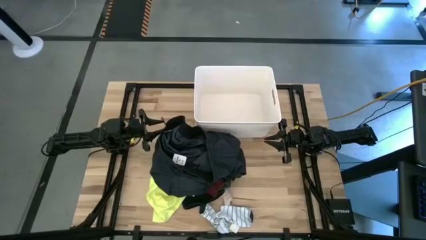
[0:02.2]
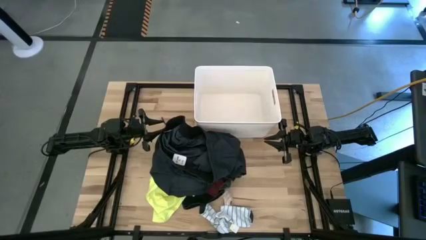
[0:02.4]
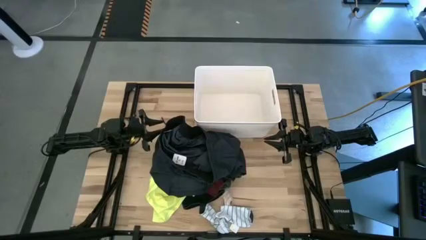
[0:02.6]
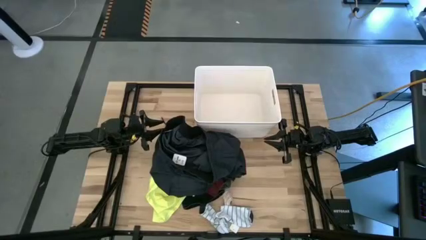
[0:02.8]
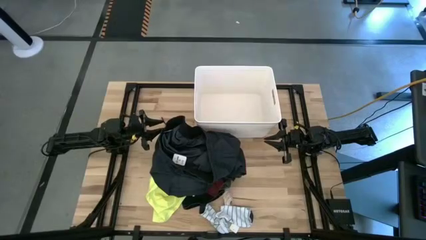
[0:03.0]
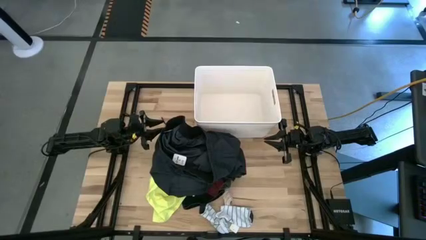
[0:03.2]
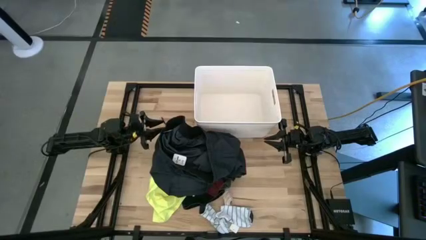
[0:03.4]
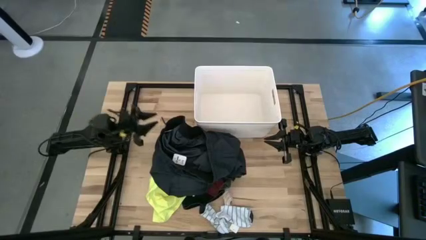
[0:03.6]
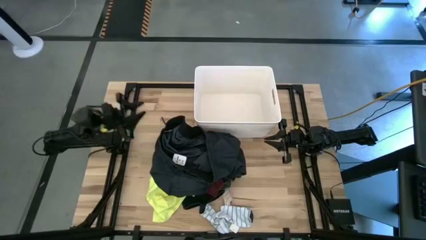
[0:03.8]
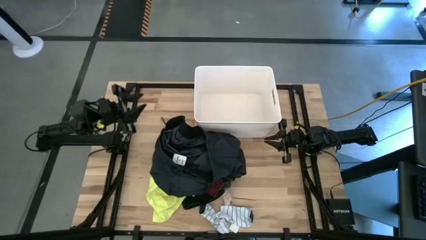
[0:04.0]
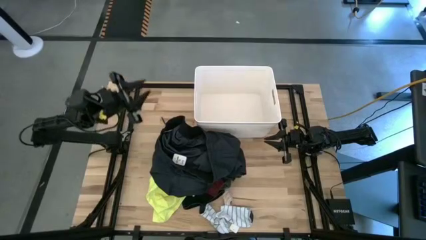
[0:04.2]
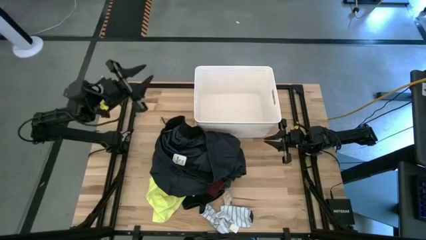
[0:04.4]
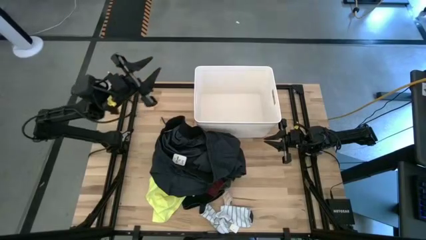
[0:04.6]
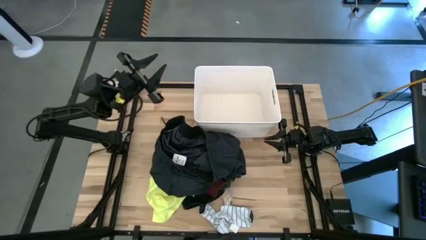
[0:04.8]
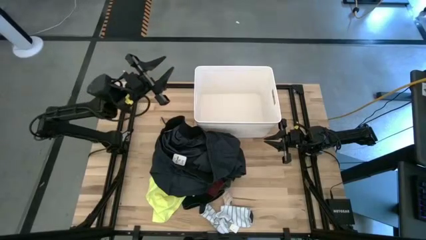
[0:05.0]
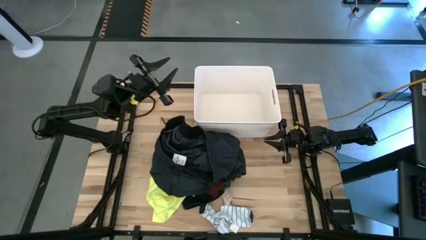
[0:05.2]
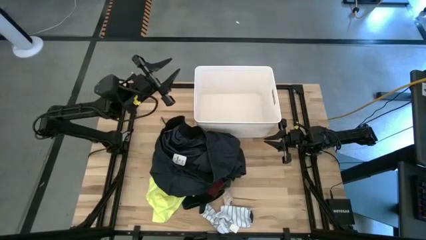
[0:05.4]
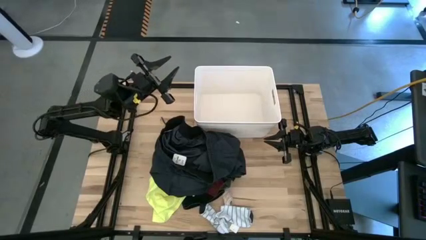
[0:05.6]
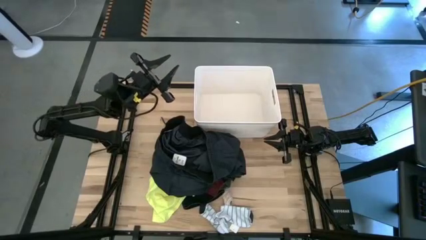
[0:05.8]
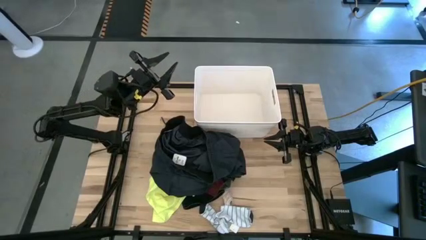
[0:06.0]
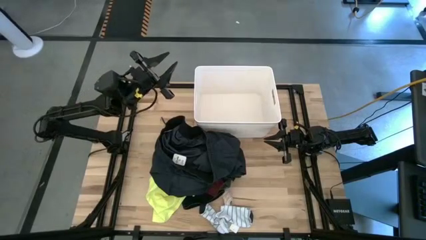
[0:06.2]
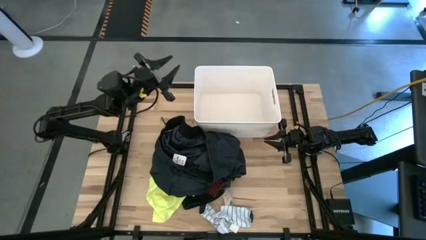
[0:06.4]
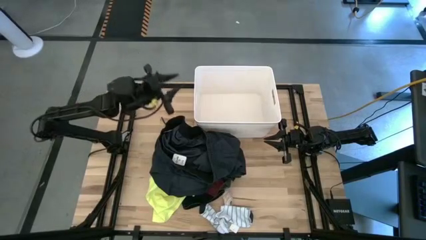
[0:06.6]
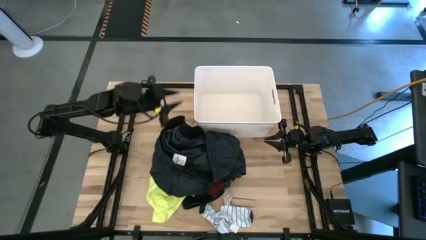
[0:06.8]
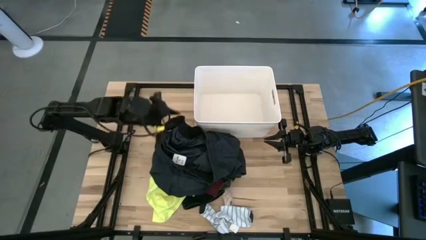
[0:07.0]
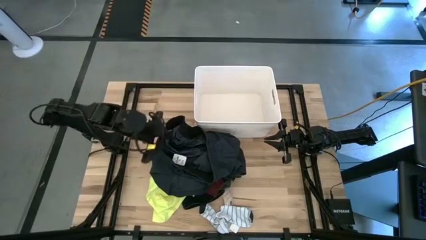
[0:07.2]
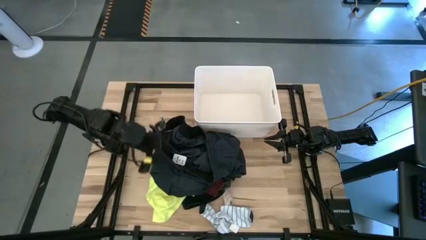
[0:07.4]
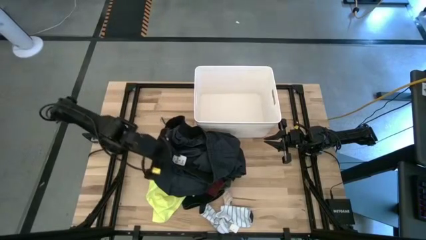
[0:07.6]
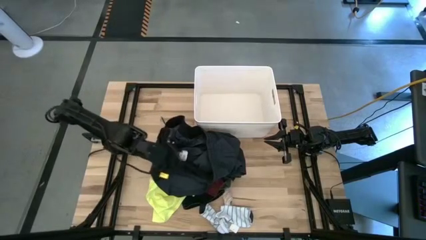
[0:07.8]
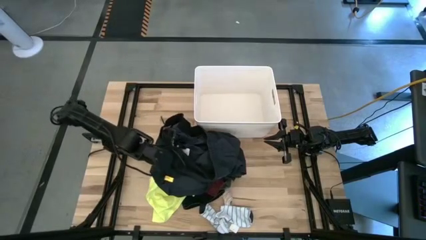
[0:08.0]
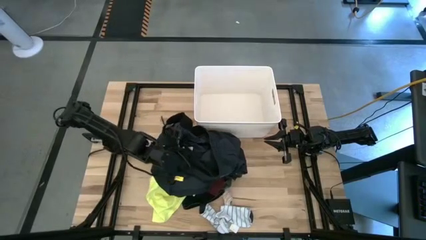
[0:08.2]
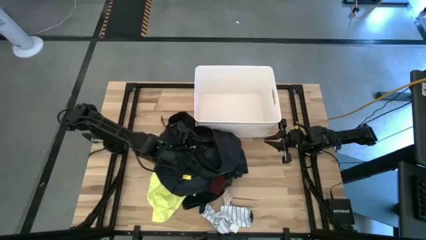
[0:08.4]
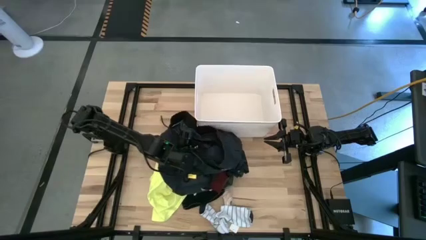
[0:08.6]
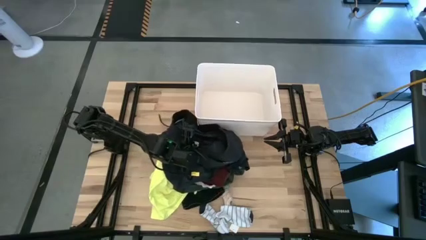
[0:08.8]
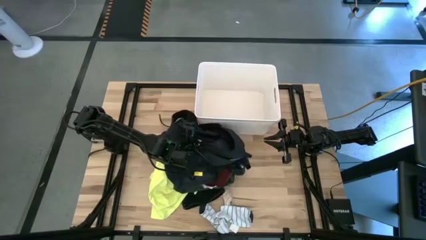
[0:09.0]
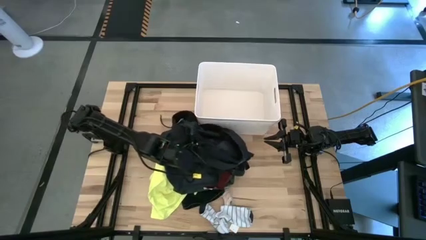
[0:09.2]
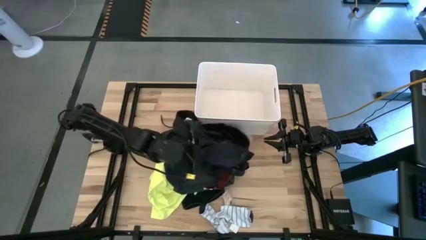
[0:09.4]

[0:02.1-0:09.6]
Task: Sort clothes
Put the black shorts into the white laundry organizer

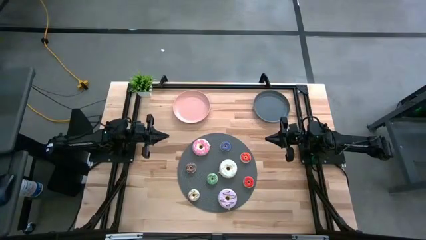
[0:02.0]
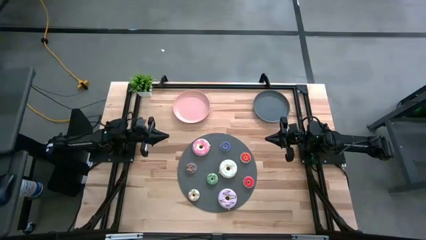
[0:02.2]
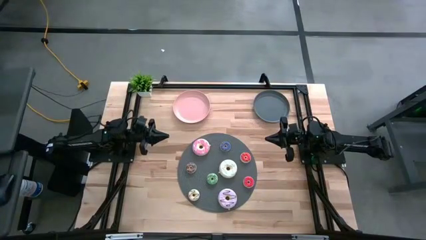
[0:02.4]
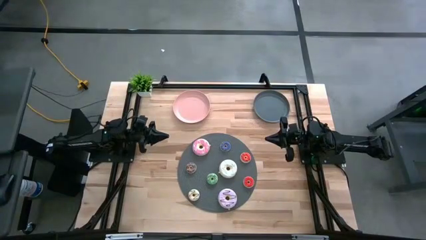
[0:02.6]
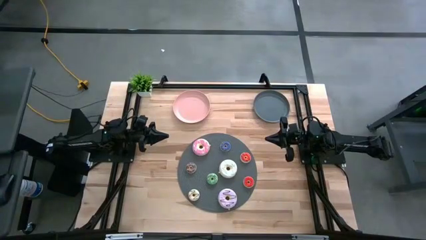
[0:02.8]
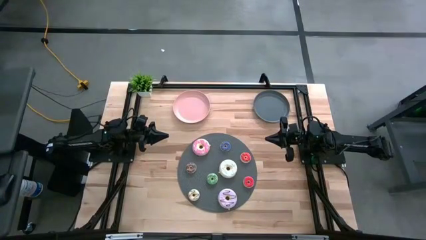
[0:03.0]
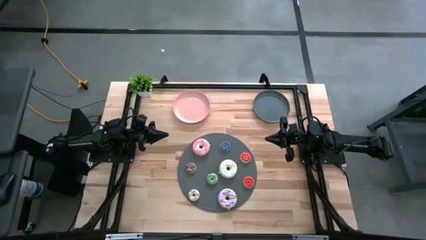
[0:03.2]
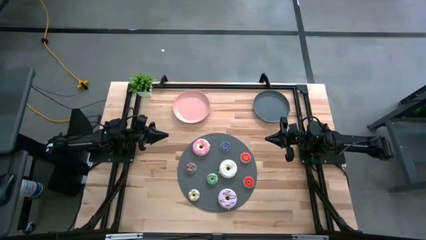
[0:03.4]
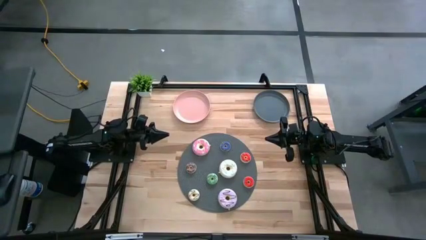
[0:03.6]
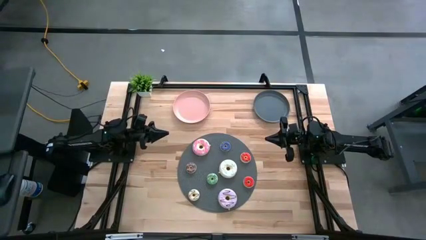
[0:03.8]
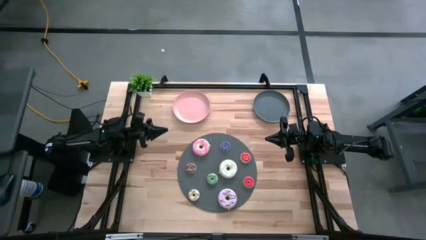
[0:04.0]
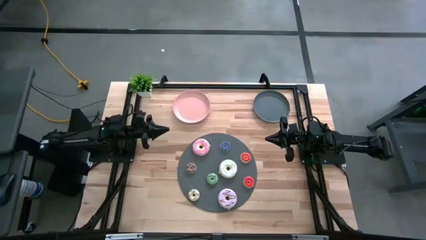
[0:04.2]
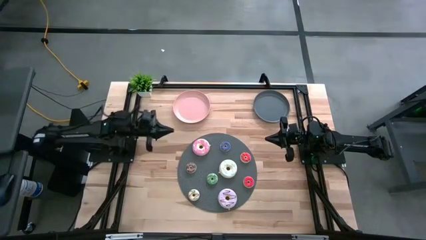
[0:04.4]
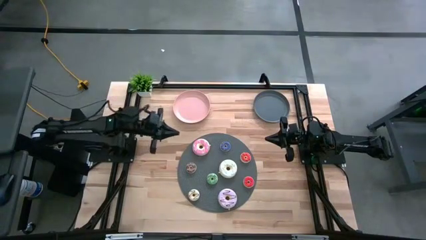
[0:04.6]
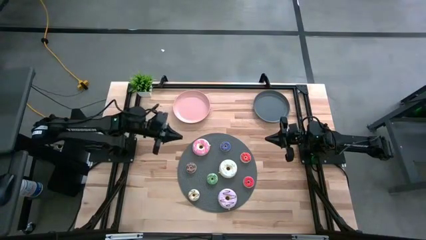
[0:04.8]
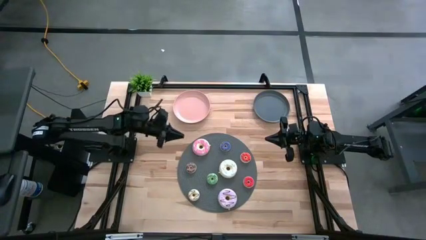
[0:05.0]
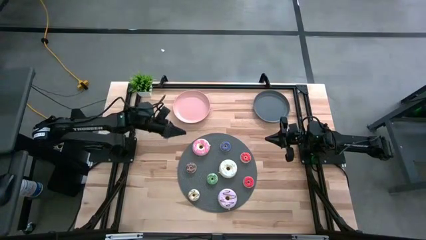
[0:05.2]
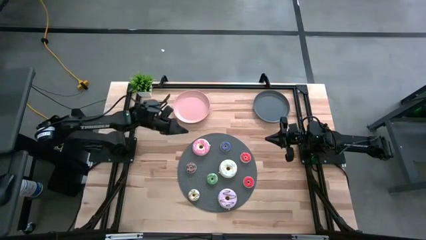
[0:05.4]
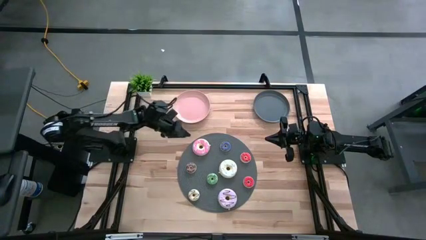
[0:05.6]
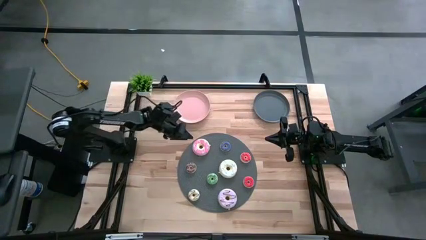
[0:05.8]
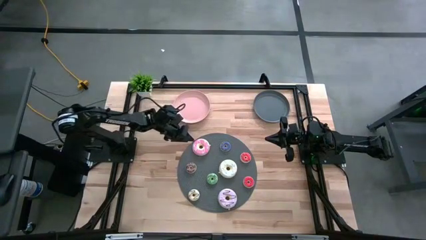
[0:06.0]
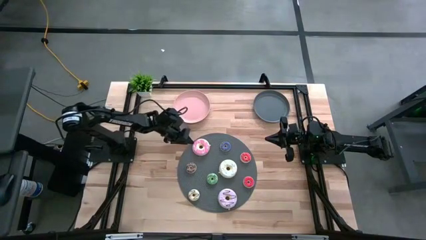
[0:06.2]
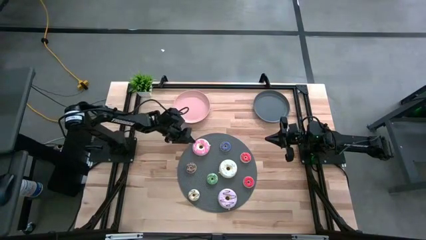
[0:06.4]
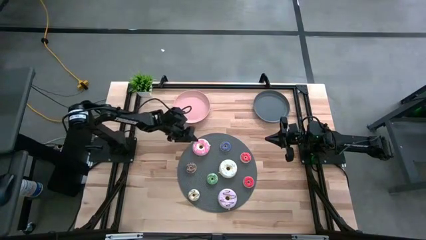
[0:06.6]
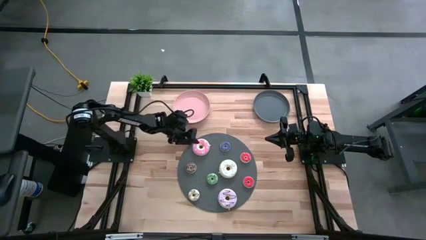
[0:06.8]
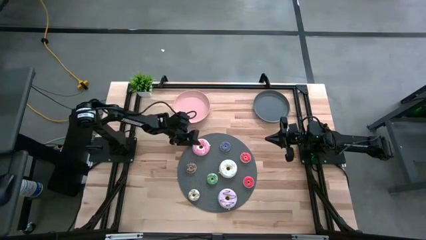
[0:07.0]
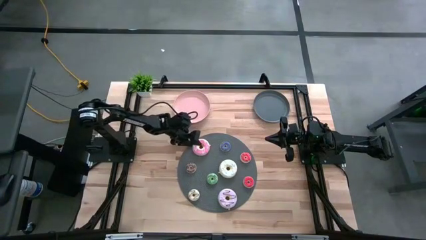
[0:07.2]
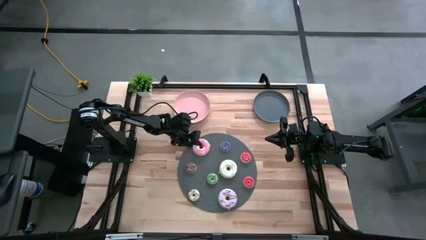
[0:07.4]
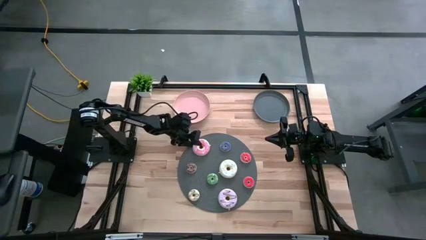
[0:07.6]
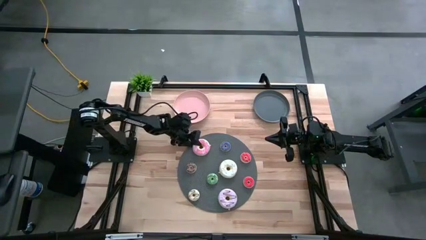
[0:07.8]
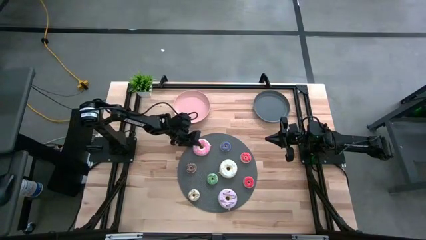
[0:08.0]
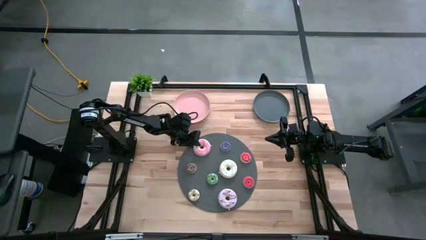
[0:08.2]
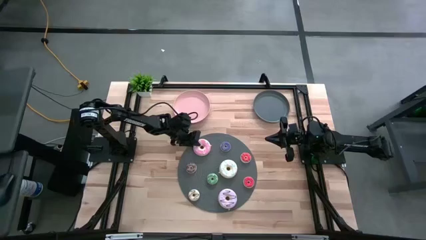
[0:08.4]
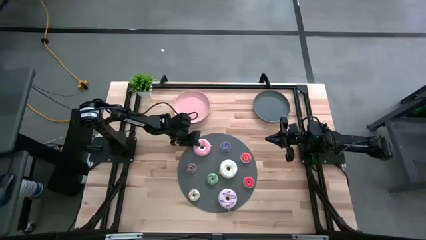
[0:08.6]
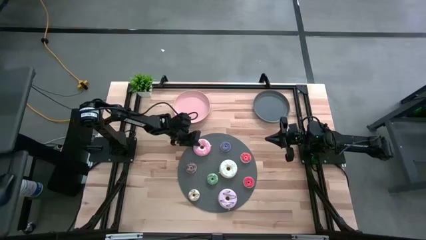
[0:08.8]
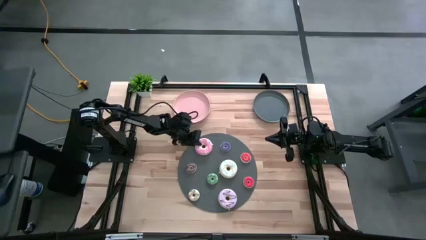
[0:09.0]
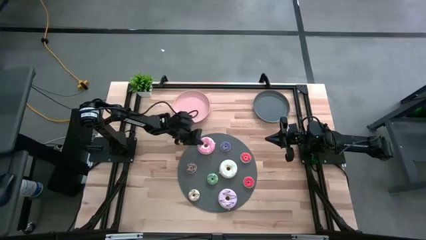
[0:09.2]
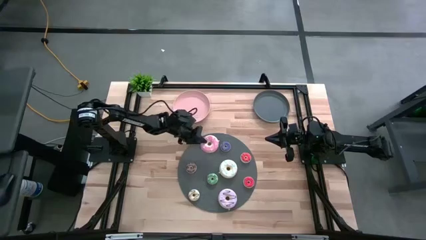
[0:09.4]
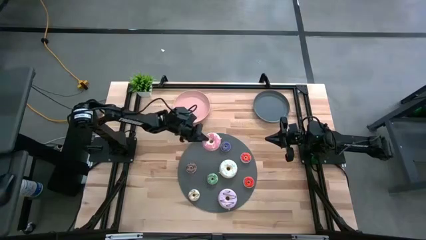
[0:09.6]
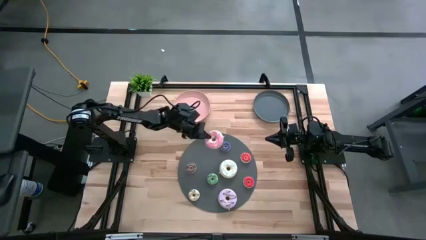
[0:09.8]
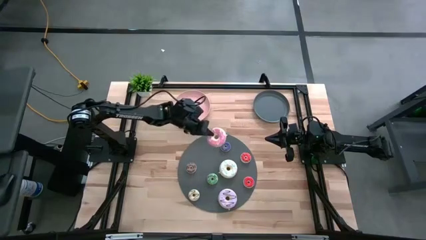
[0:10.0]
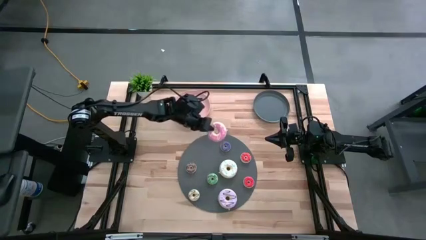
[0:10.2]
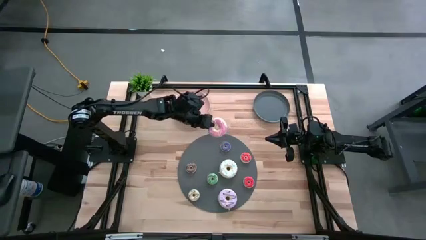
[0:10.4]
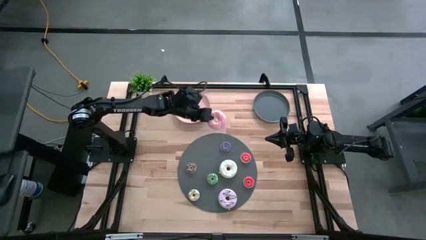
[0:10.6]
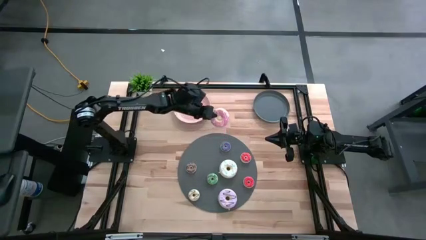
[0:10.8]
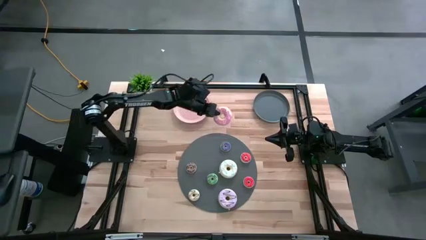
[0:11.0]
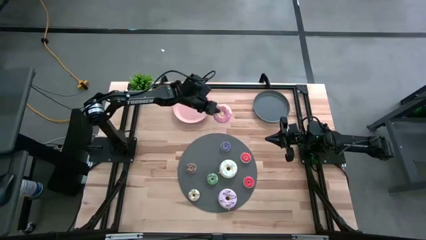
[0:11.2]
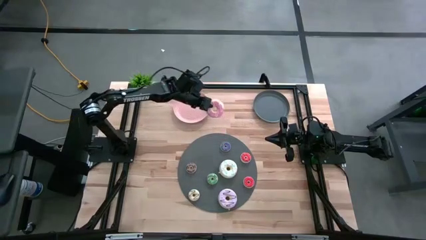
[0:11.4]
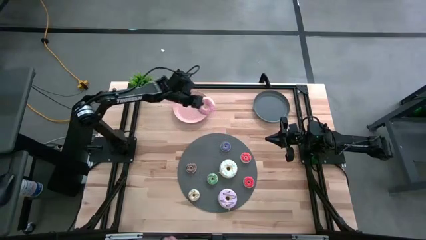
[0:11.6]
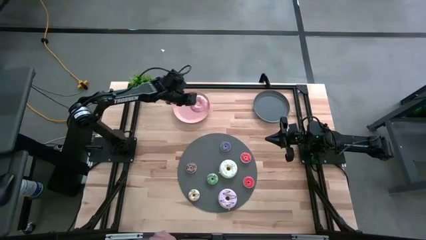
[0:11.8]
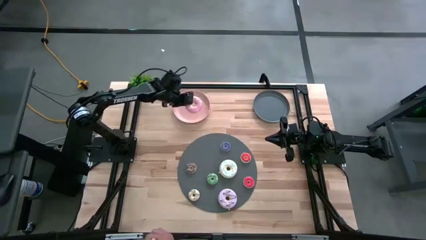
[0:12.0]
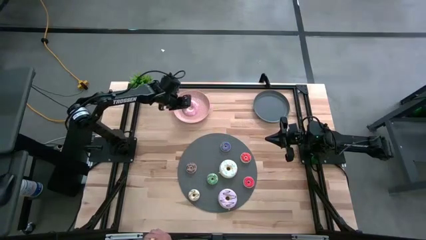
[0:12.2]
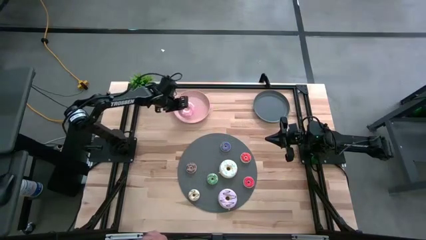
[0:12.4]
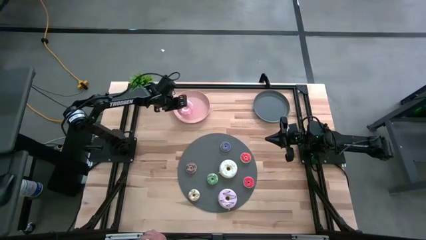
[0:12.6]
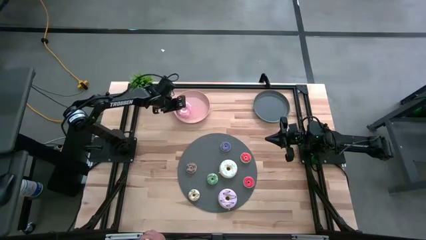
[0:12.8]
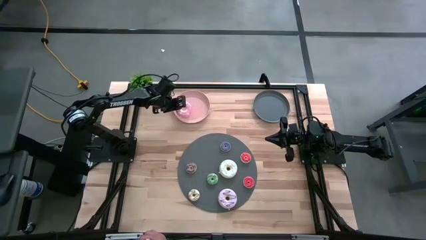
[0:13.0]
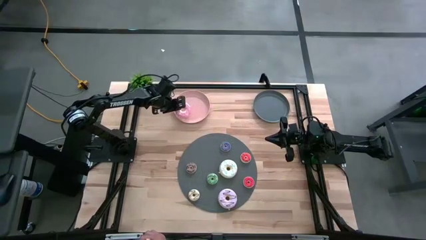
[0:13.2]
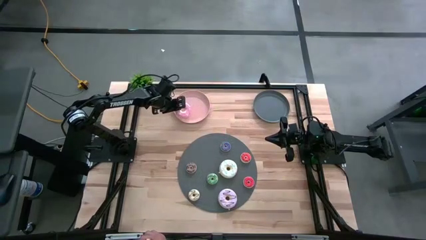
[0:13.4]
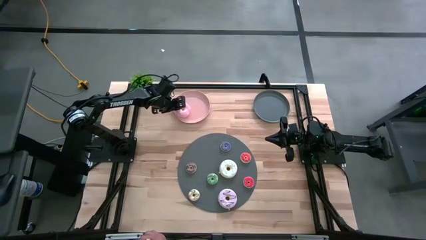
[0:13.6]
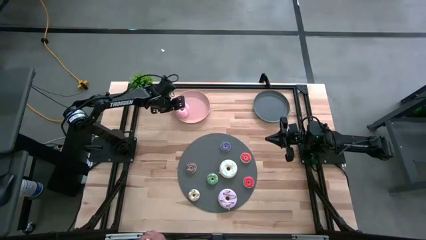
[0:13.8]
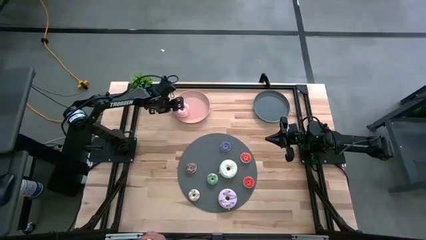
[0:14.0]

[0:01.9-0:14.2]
Task: Pick & Place donuts
Put the large pink donut on the pink plate
